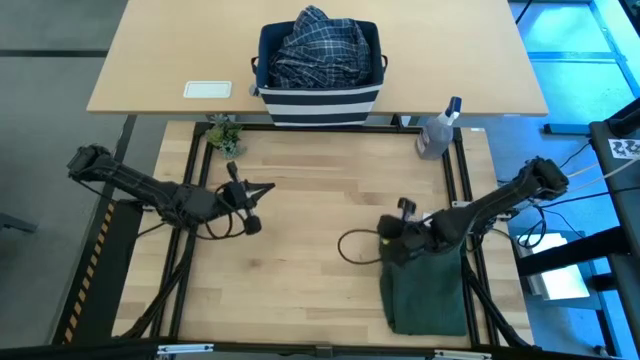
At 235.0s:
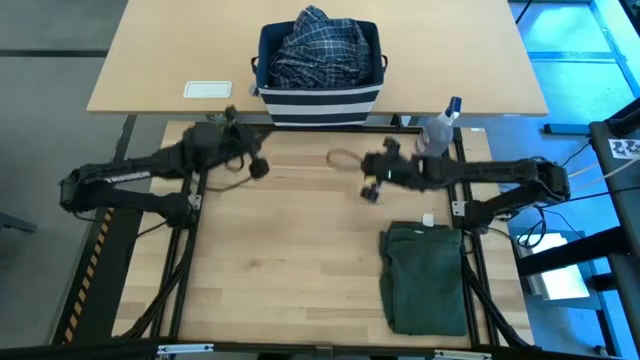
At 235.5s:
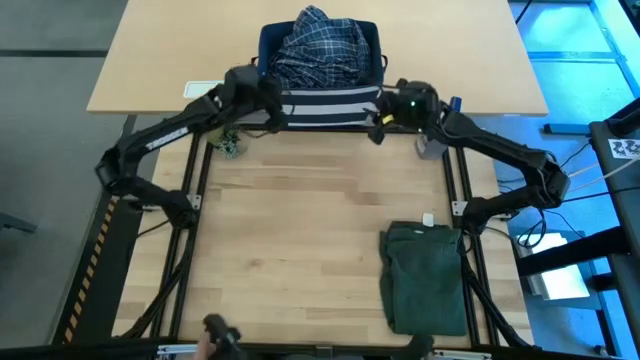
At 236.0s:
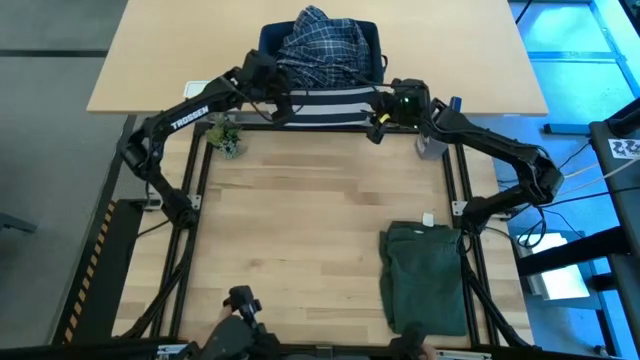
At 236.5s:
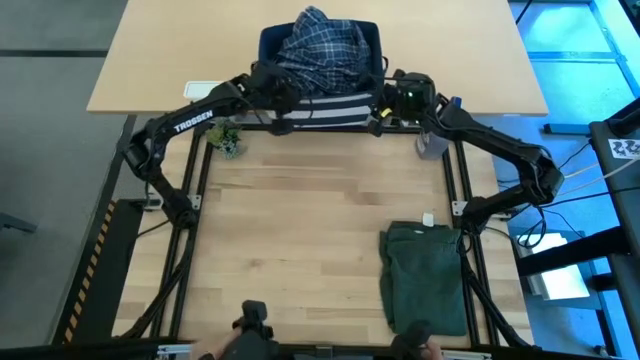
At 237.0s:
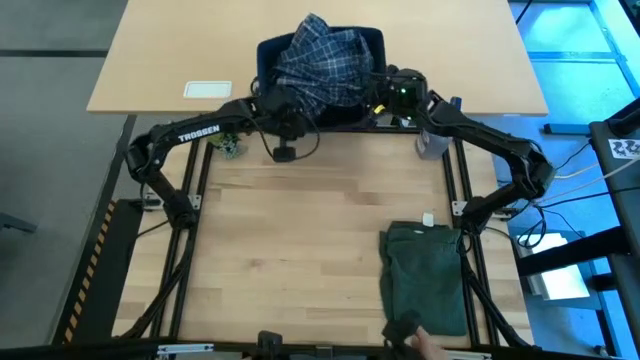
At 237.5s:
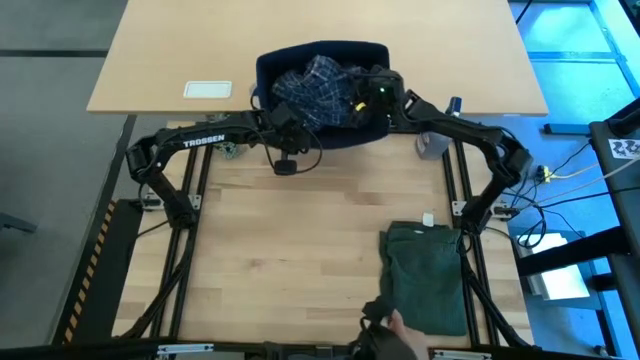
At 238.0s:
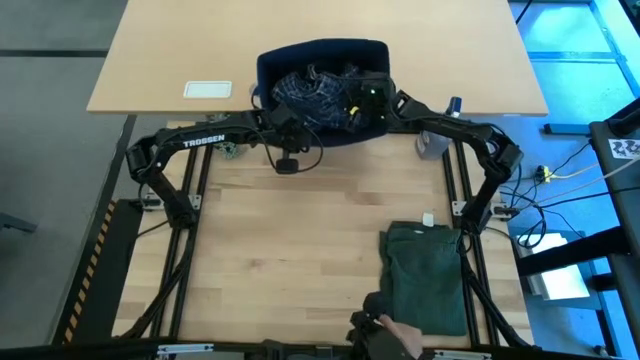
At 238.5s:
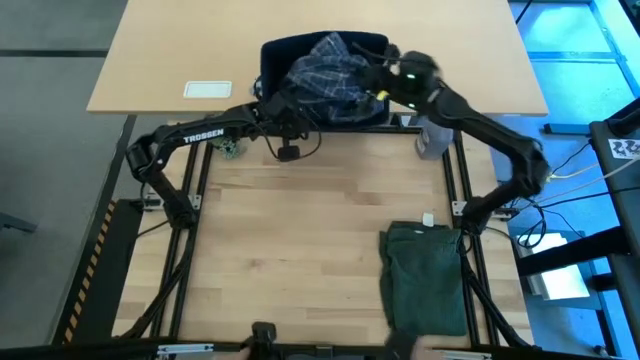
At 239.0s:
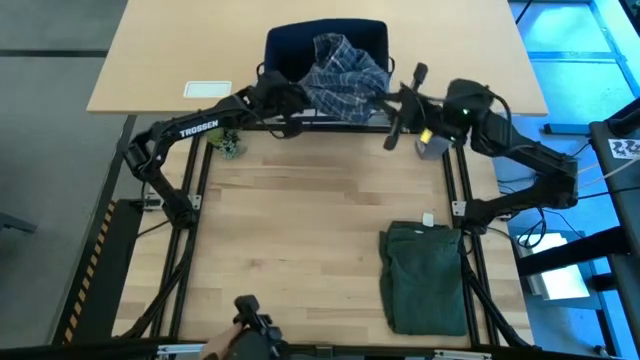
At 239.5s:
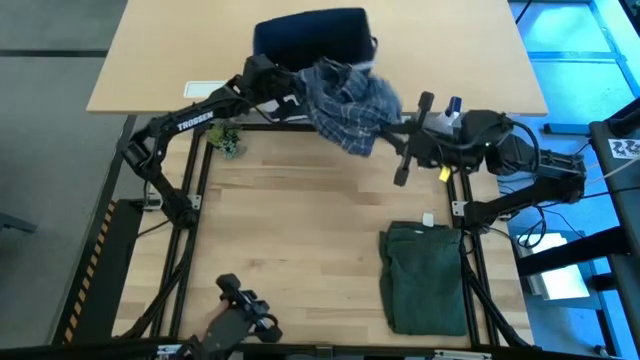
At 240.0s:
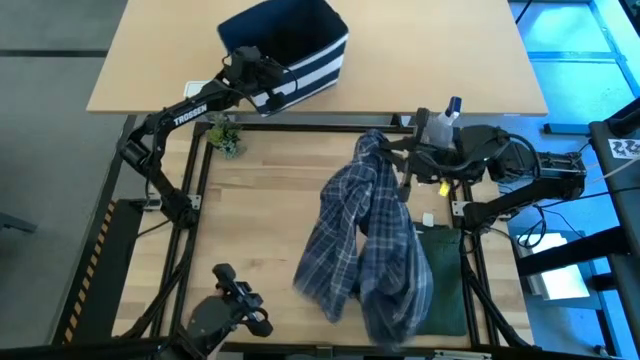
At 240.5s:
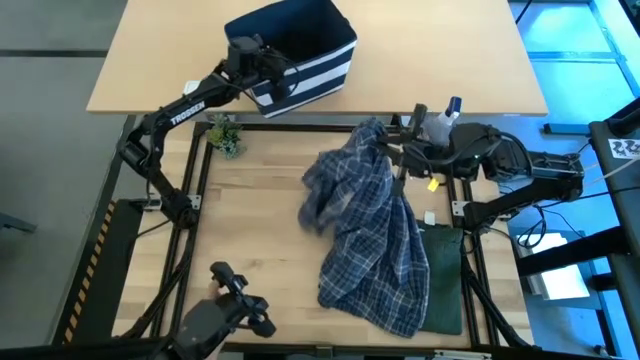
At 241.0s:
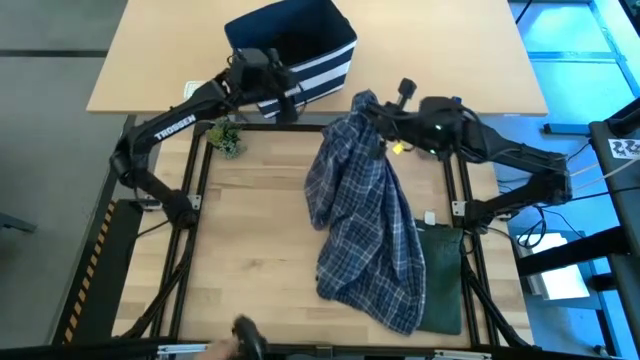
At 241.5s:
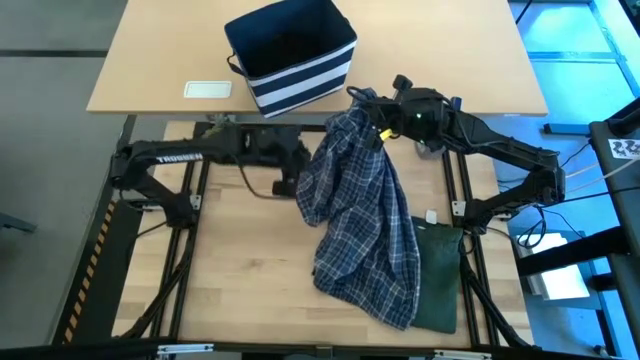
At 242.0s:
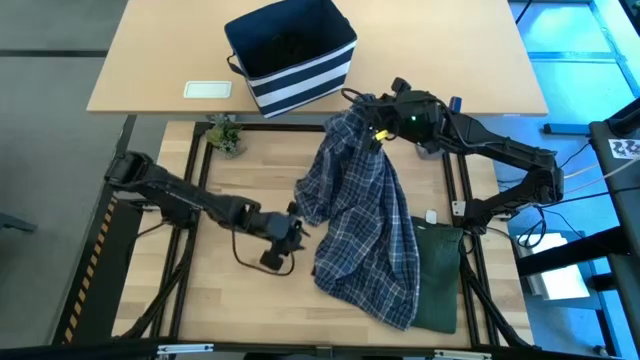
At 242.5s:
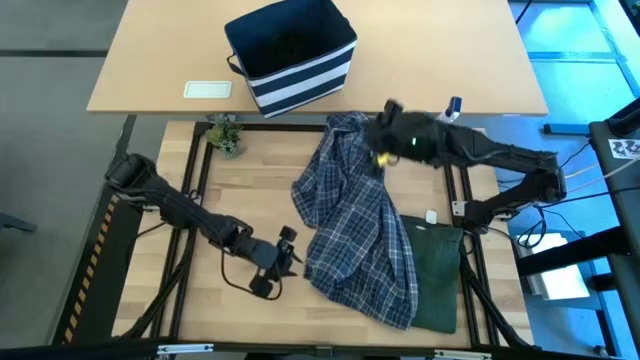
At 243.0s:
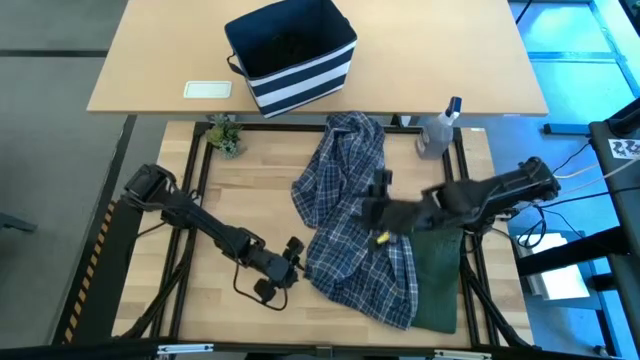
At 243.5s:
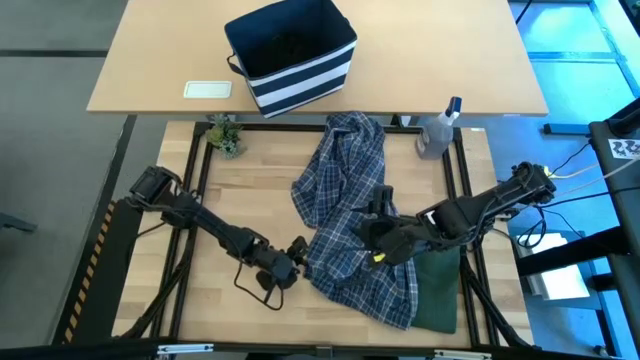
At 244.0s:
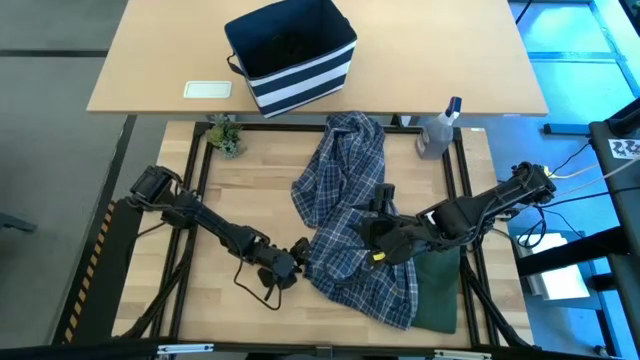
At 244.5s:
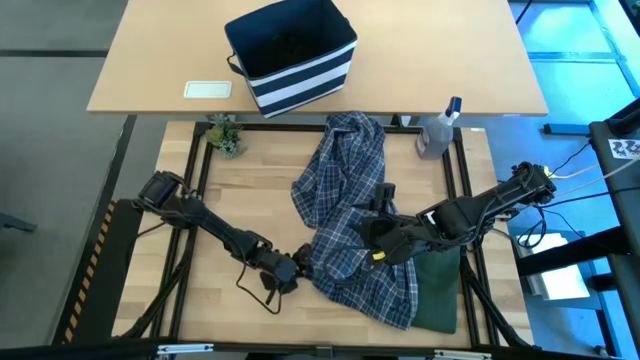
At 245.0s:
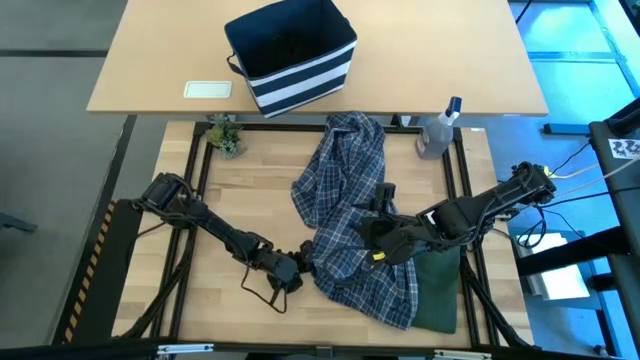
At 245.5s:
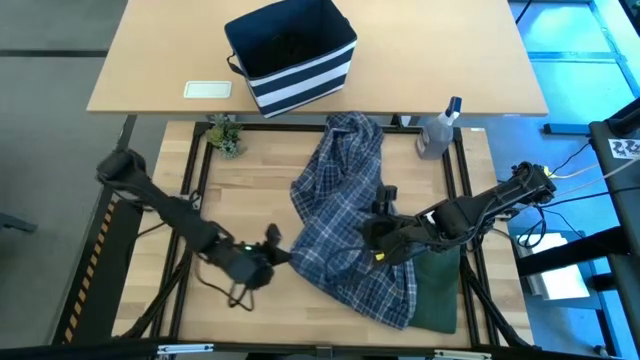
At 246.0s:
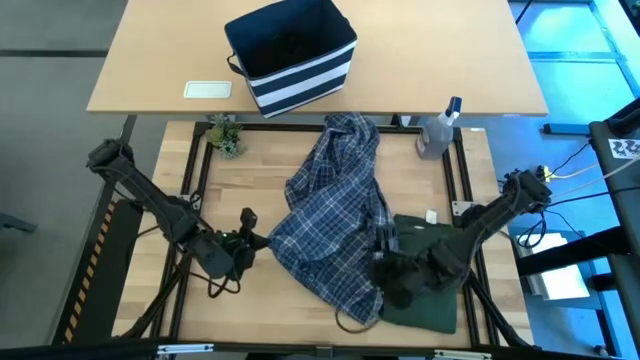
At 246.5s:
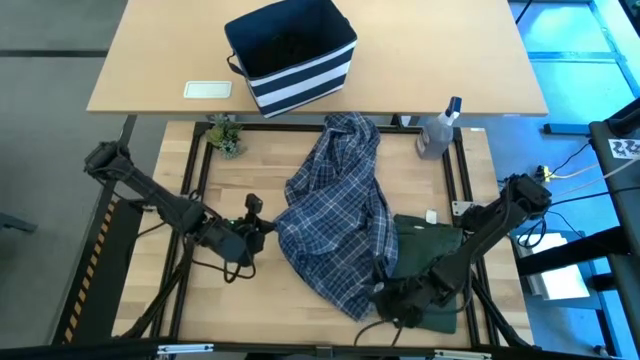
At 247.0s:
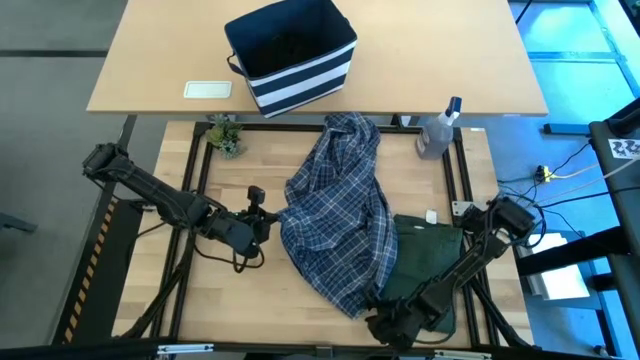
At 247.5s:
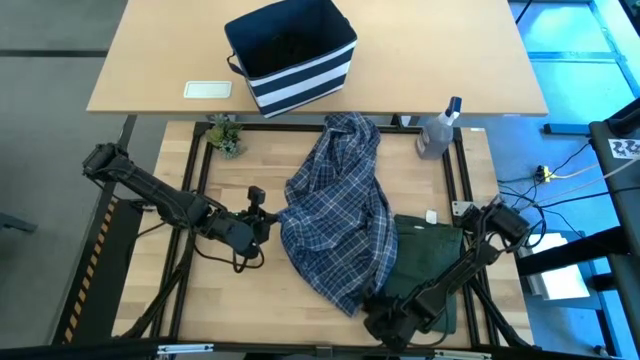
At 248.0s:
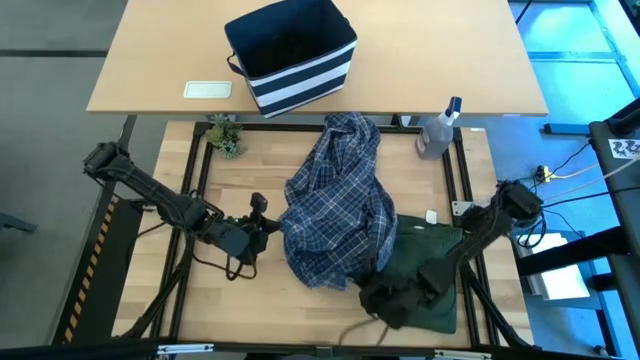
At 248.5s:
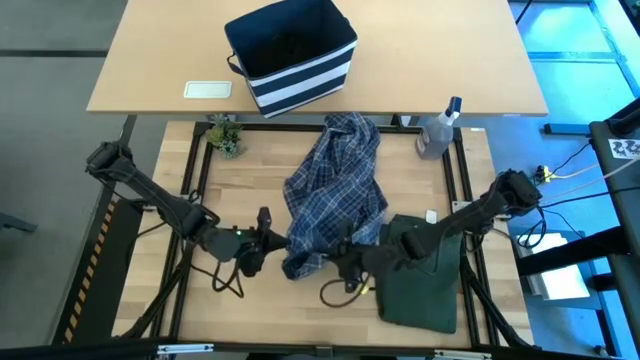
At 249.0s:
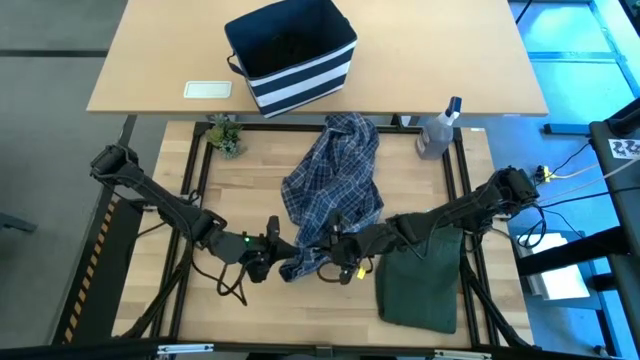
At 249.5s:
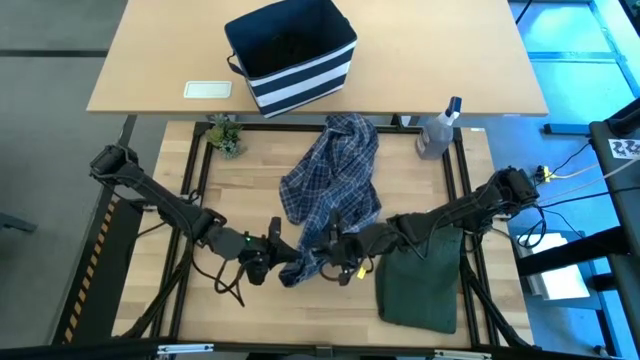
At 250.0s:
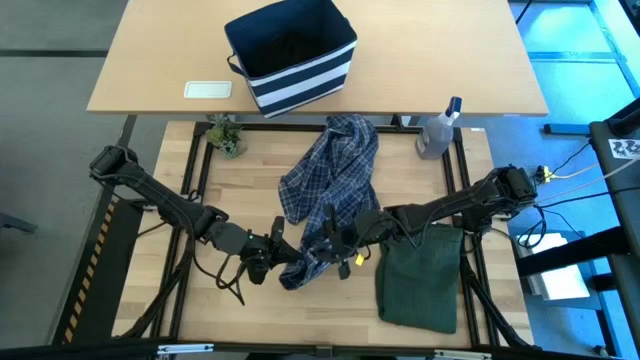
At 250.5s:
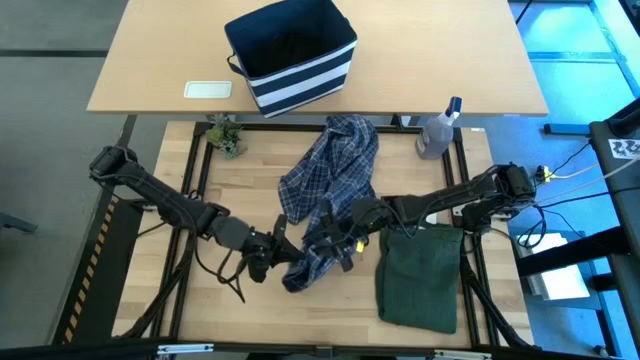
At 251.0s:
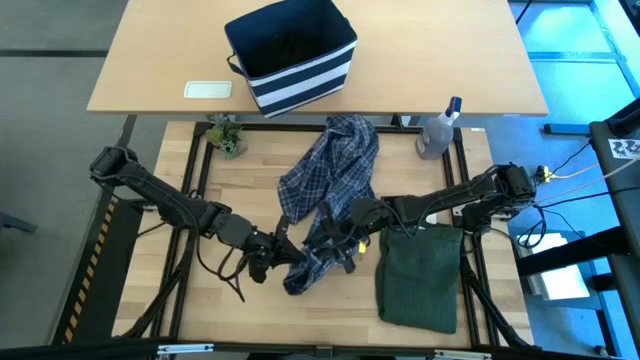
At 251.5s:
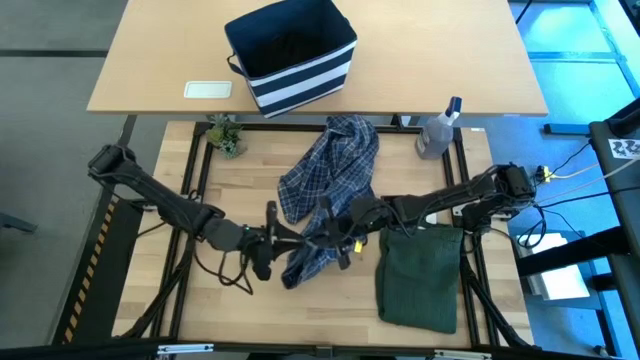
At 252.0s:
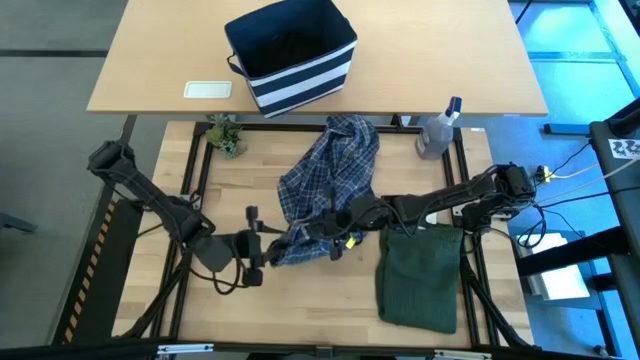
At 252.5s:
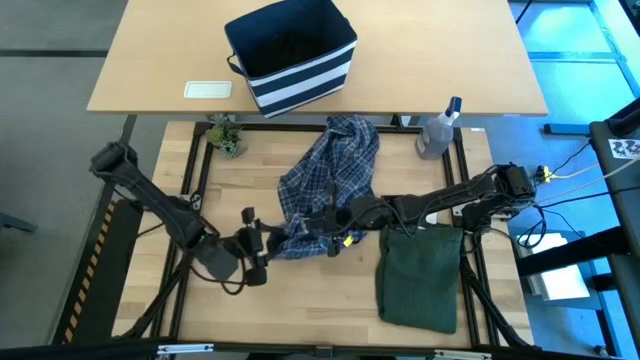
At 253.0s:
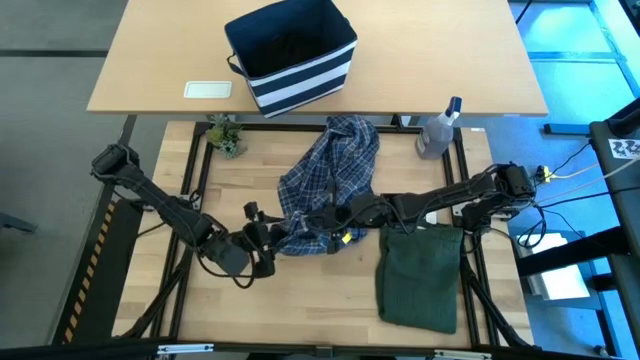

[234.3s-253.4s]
Task: Fold Laundry from Bin
Fold the blue checkered pants

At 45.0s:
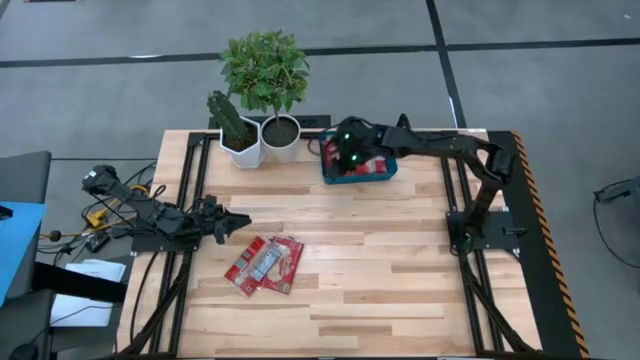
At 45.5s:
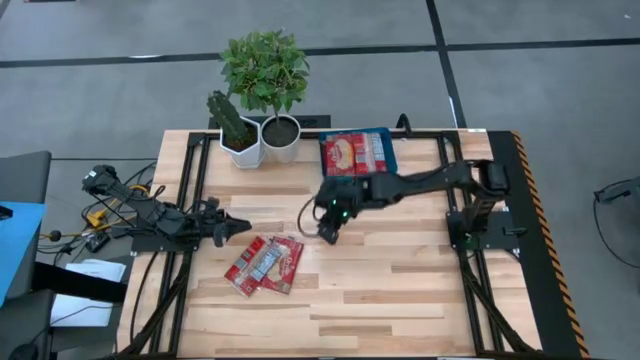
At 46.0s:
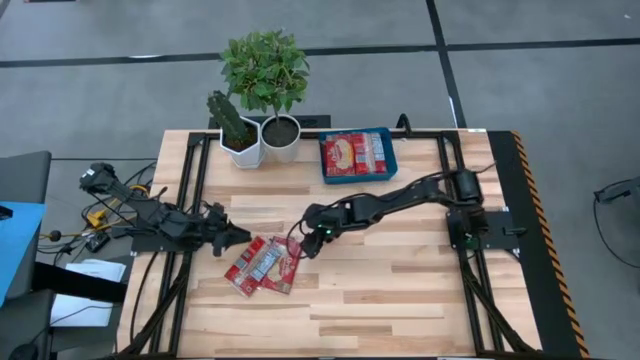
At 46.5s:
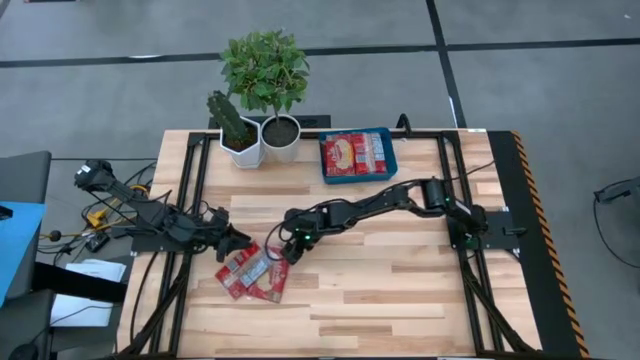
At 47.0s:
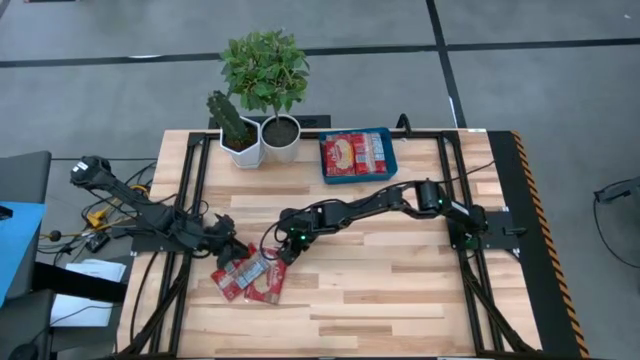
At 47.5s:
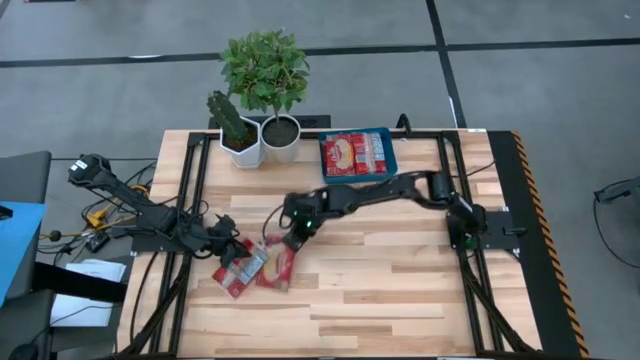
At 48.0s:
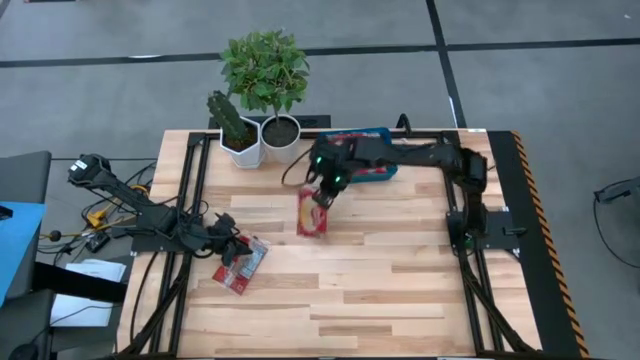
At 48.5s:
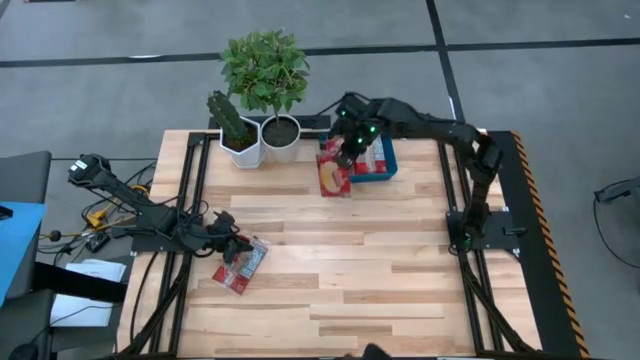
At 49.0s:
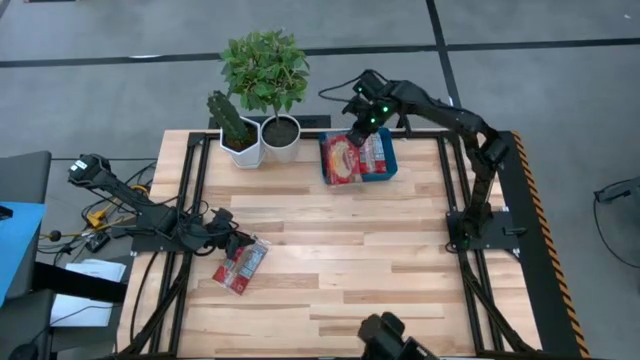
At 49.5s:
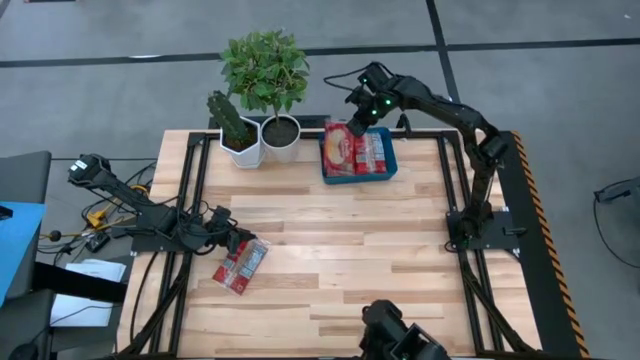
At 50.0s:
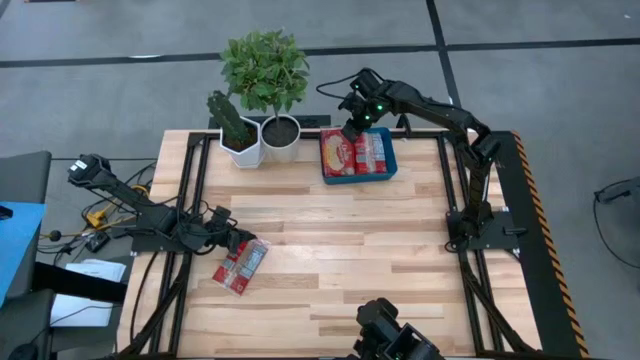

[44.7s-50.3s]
Task: Sort popcorn bags into baskets
Put the red popcorn bag into the blue container
